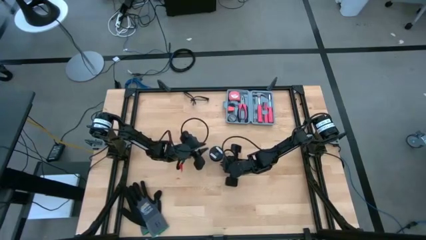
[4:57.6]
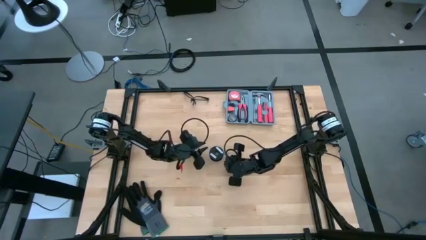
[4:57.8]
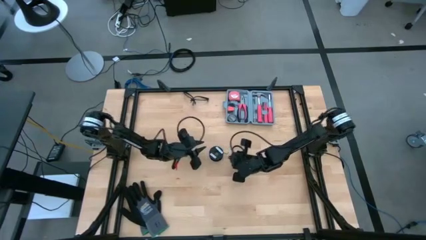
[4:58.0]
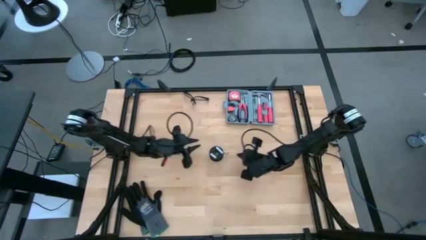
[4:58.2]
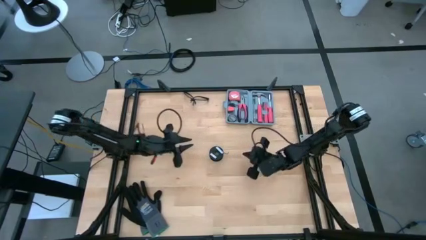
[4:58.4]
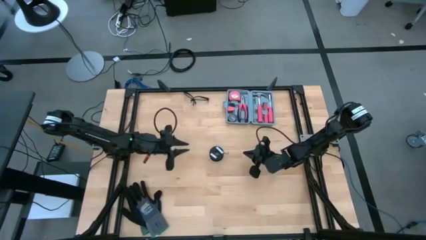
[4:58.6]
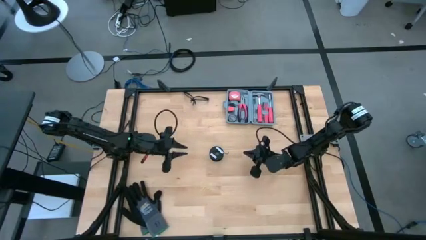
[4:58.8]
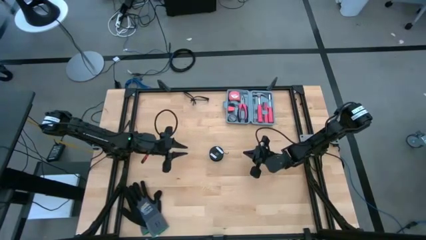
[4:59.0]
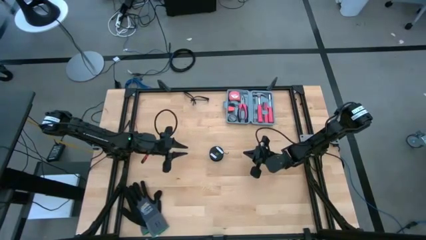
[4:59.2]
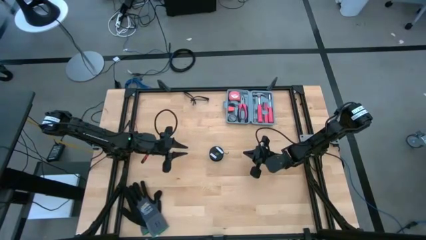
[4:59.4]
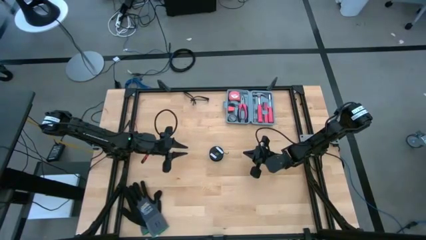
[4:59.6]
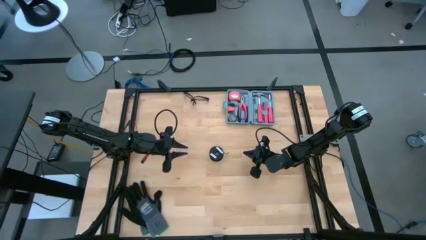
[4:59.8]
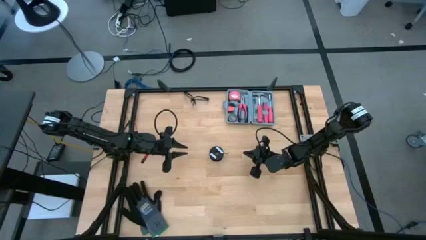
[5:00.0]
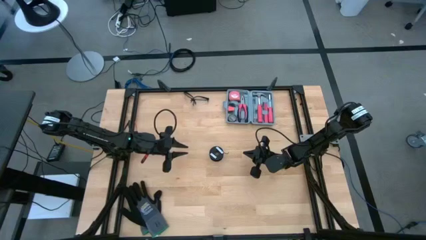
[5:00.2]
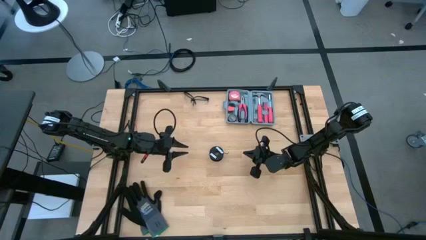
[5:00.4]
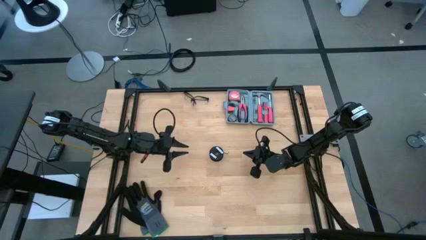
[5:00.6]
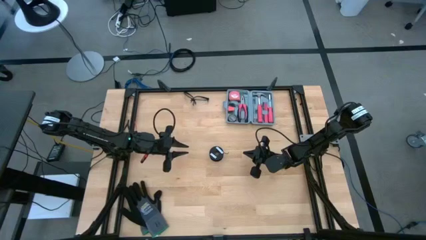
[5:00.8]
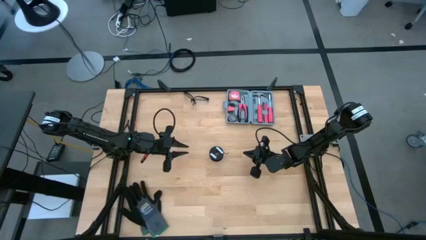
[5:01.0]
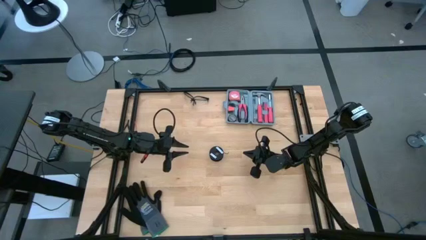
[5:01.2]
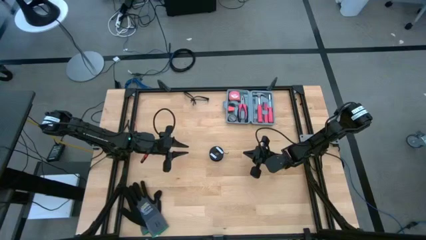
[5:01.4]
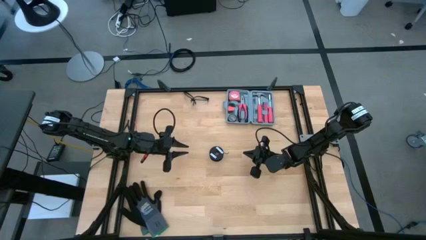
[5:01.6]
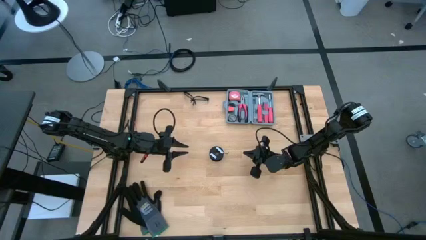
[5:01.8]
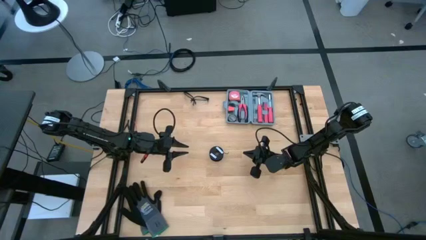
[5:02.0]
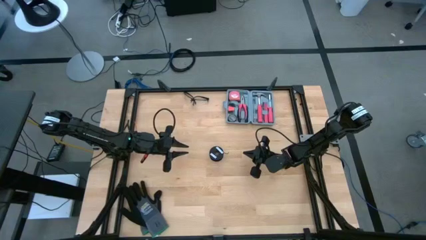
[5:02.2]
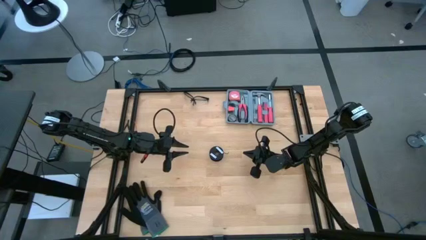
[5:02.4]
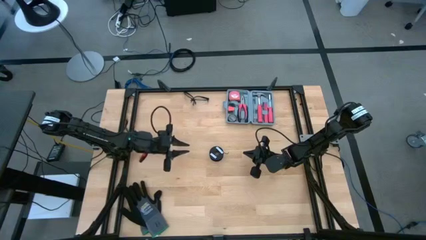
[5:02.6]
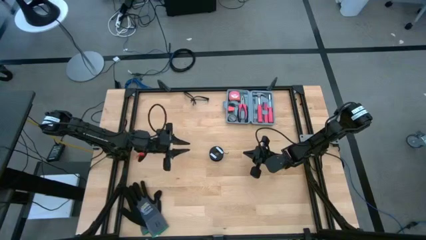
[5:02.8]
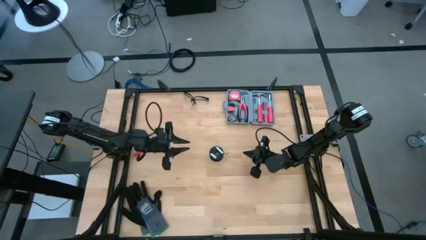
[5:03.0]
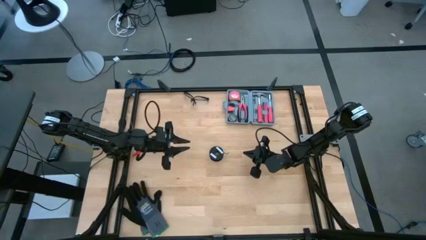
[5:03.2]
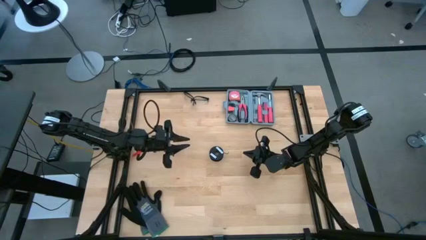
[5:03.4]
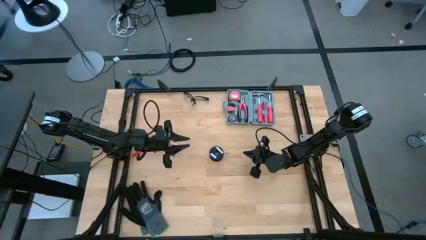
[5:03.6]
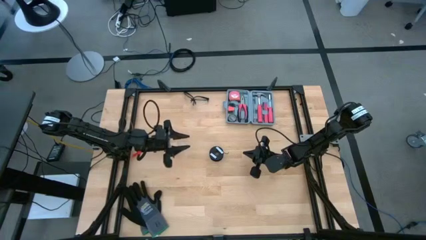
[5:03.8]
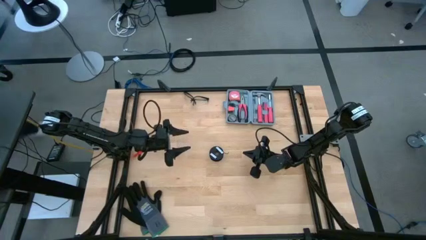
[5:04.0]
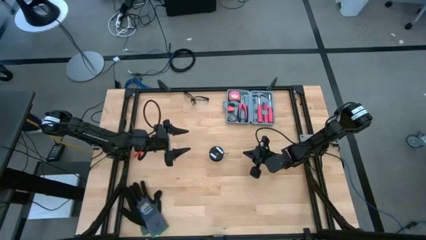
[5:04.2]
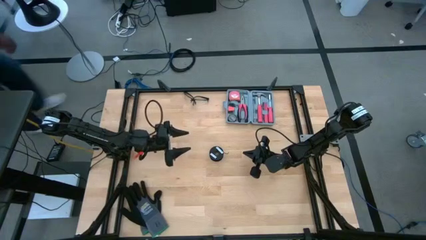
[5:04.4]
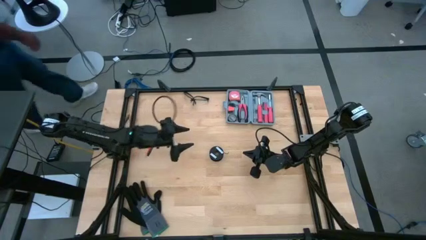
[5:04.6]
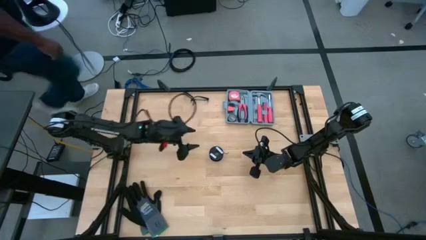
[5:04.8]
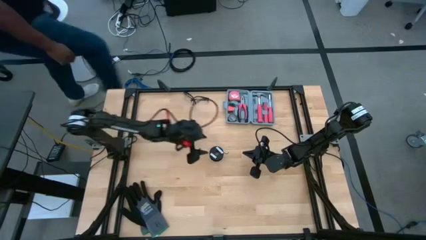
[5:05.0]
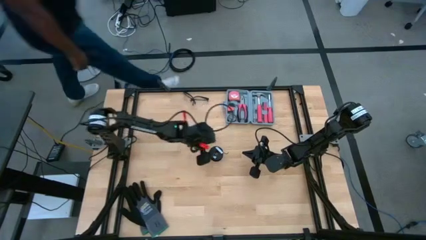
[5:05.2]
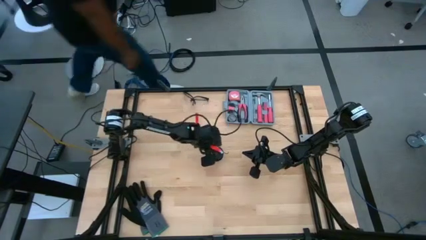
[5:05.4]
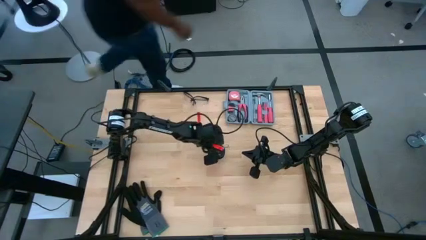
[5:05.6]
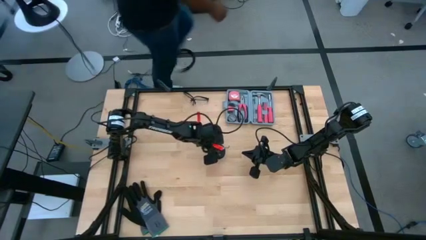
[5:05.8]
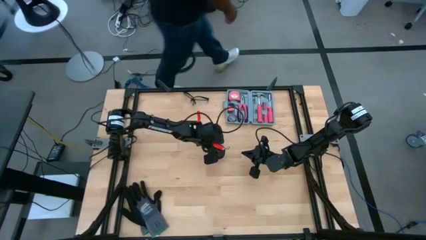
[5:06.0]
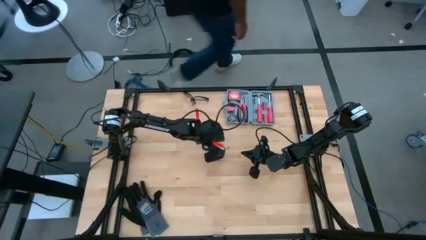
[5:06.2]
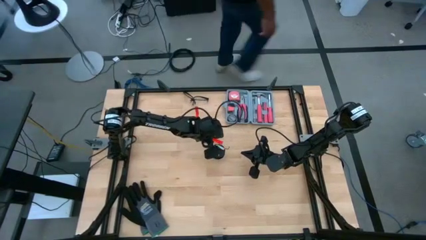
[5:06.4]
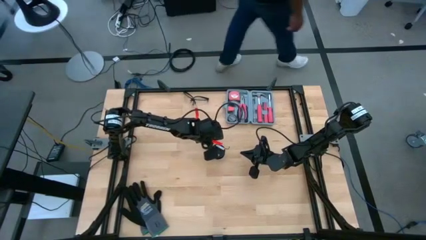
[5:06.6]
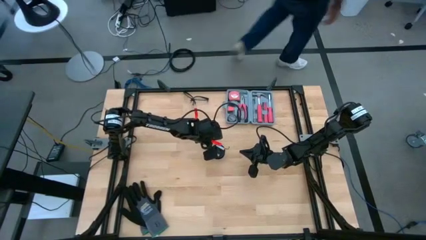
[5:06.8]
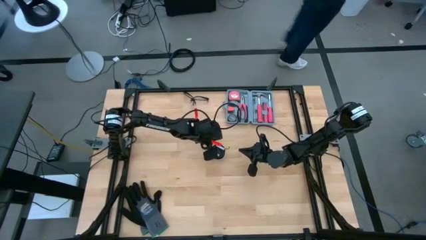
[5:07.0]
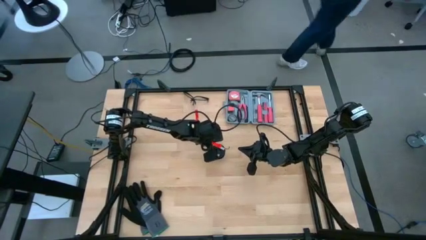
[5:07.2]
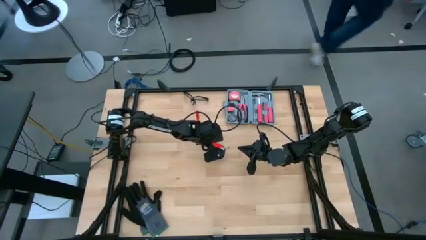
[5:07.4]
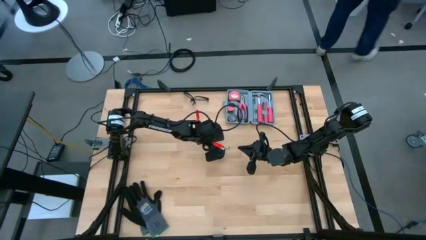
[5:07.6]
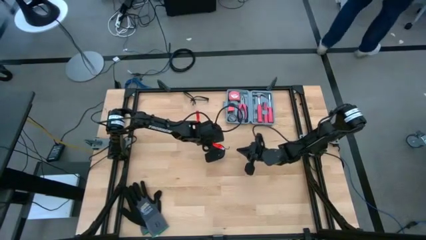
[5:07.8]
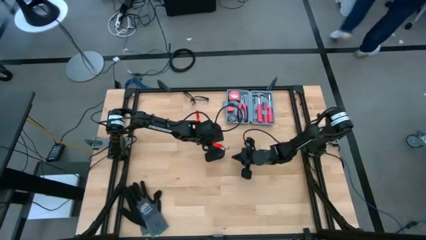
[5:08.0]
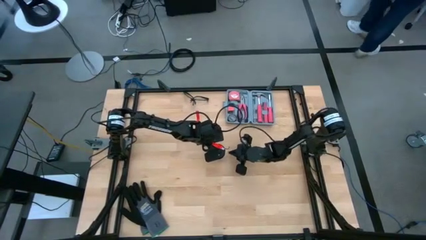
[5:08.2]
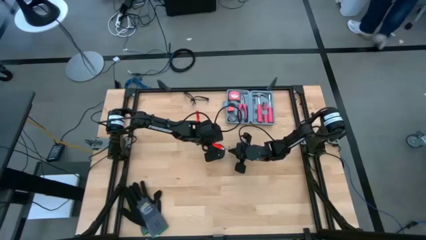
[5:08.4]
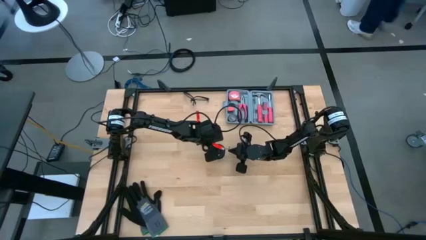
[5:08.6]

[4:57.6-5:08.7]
Task: Coil cords
Uncoil the black wire from the spool

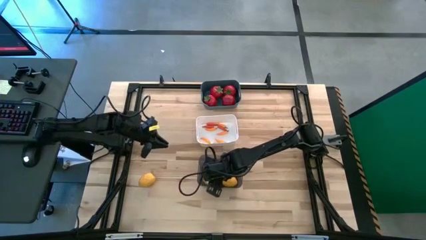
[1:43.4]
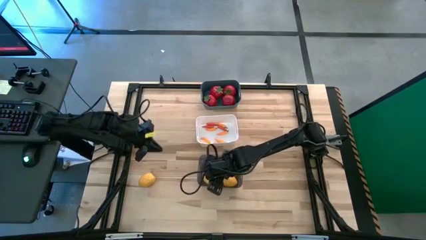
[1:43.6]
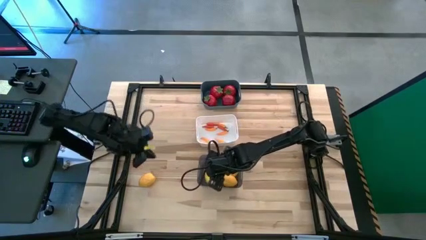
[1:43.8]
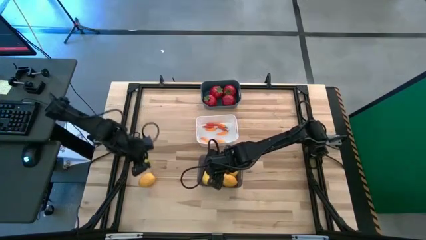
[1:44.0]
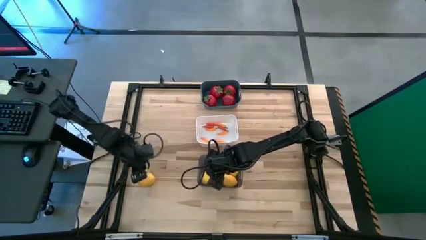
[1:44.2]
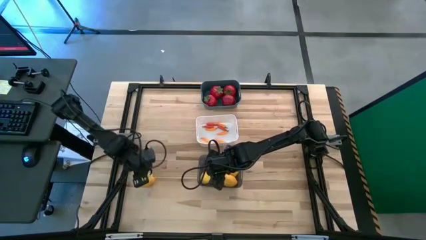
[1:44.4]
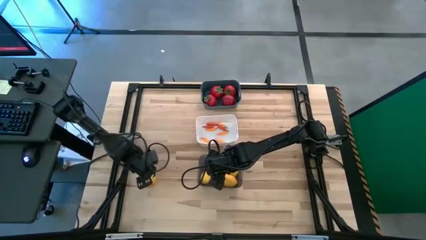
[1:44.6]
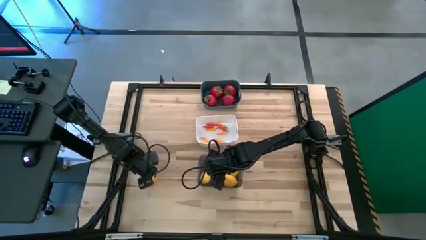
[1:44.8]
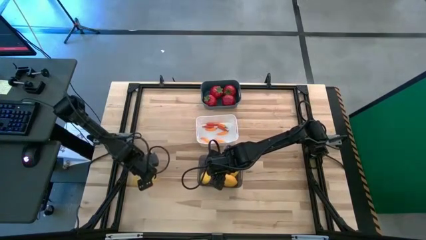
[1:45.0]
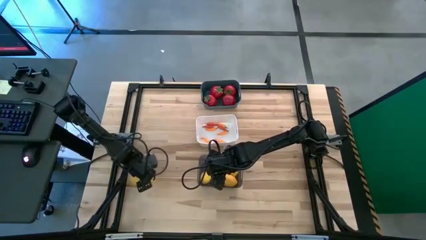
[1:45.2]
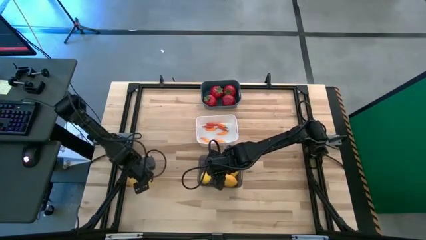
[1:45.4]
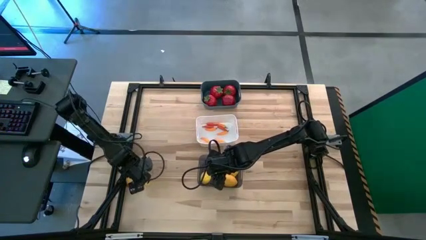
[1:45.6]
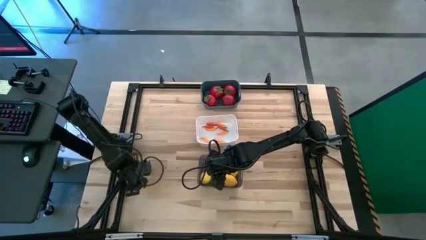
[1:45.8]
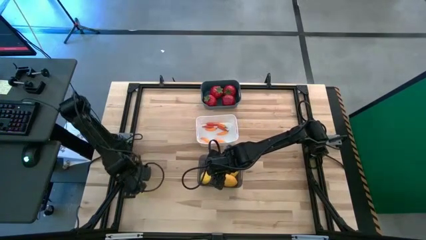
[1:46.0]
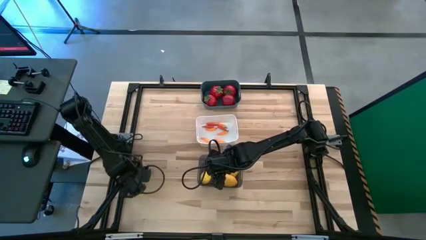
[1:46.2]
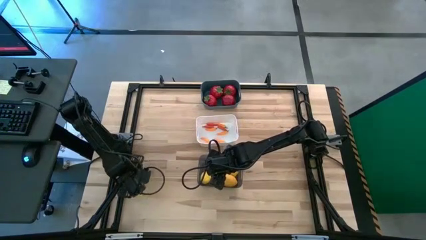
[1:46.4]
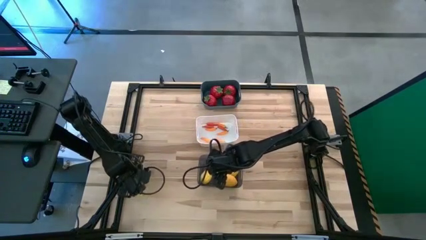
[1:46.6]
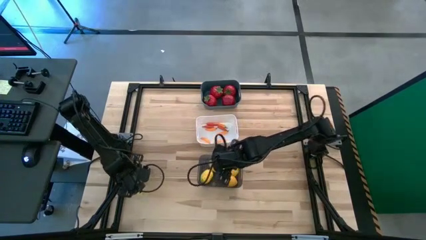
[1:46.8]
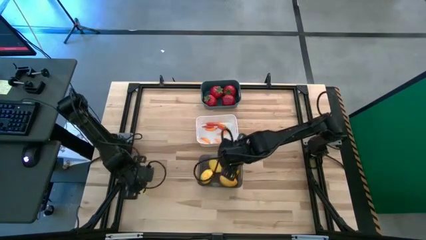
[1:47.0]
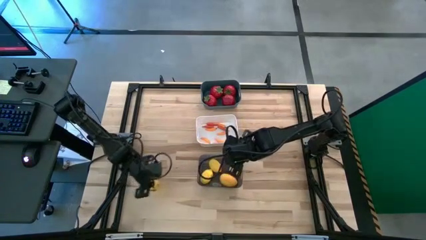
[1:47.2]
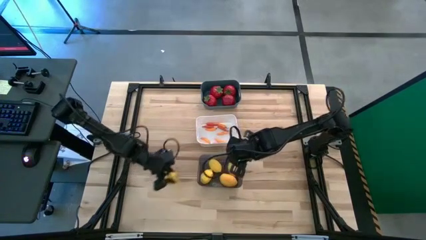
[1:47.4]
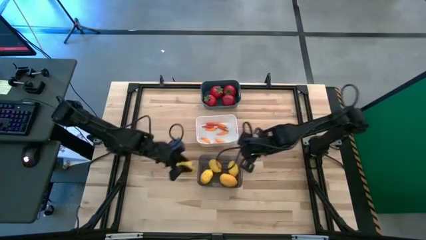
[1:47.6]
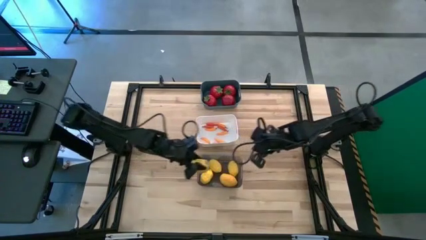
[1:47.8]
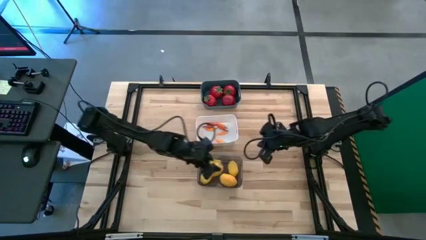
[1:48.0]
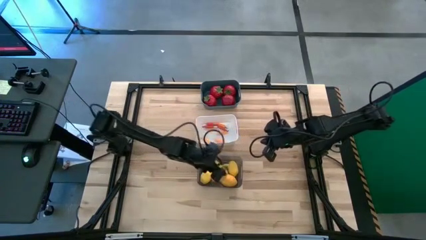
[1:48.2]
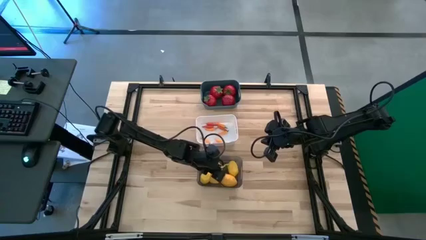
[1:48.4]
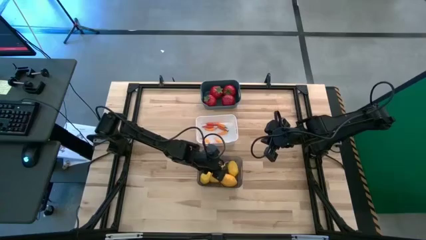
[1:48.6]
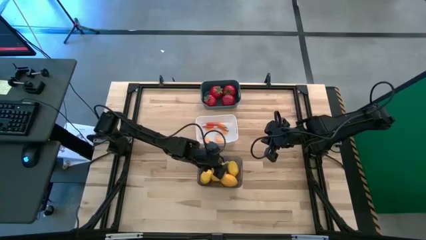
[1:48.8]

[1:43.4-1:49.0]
Task: Sort produce into baskets
Put the yellow lemon into the black bin
